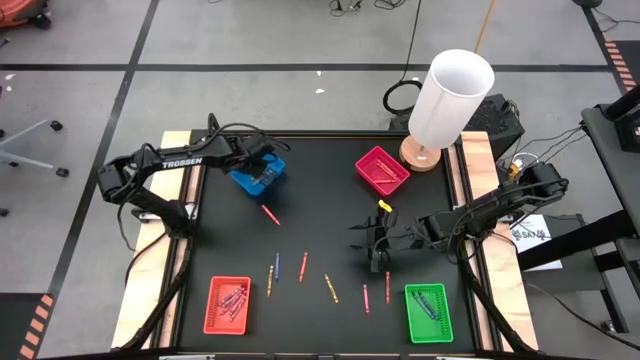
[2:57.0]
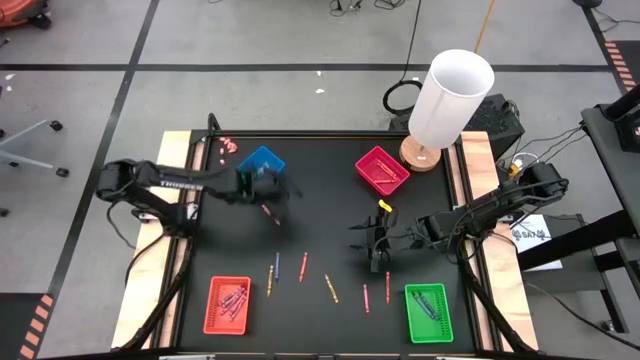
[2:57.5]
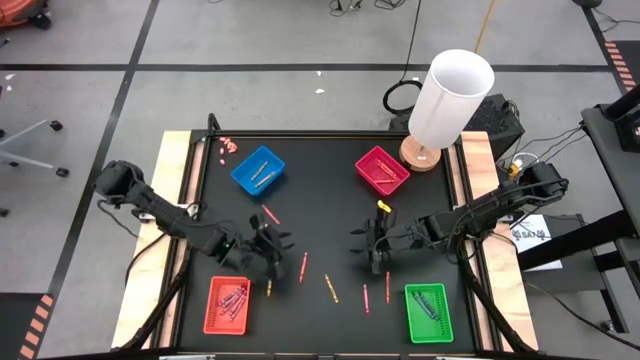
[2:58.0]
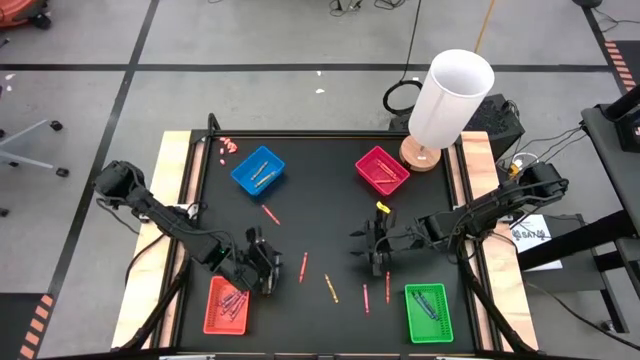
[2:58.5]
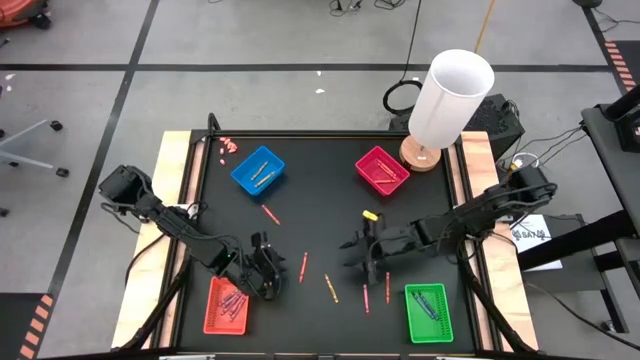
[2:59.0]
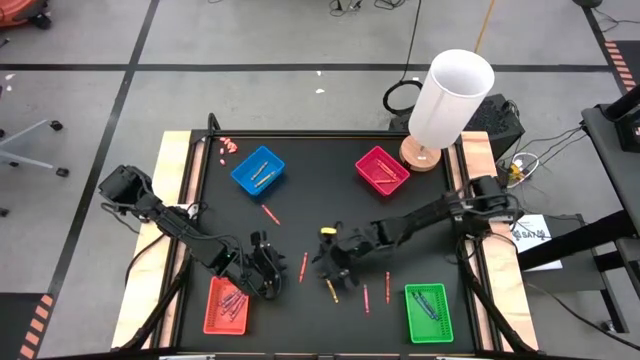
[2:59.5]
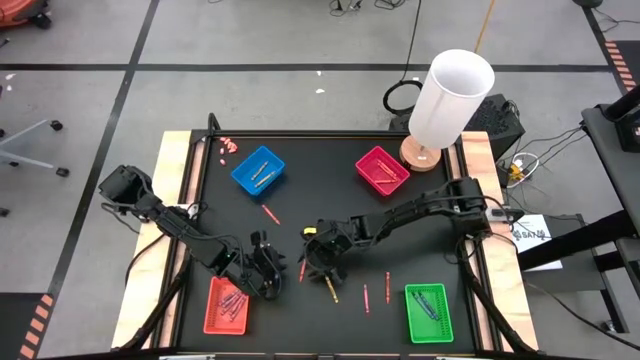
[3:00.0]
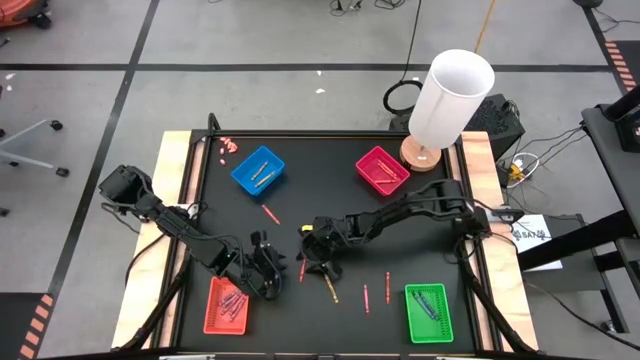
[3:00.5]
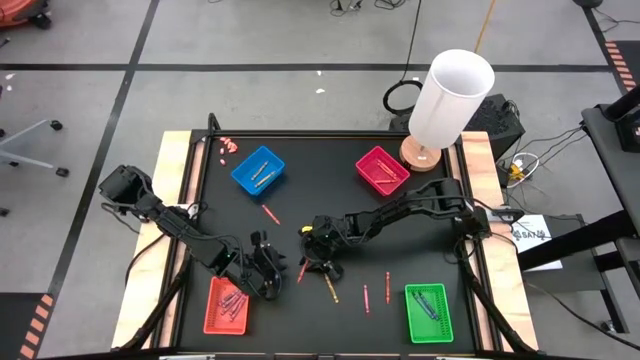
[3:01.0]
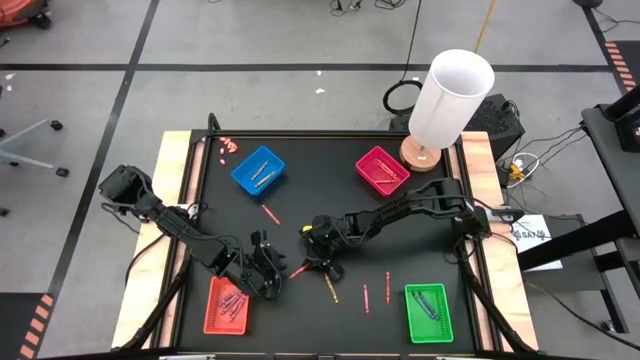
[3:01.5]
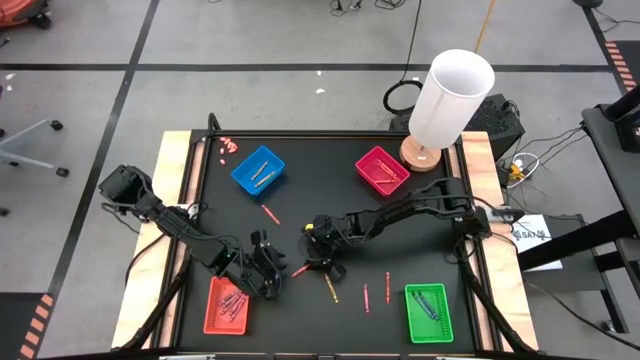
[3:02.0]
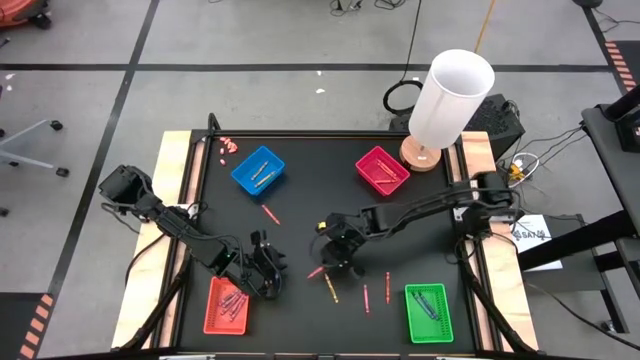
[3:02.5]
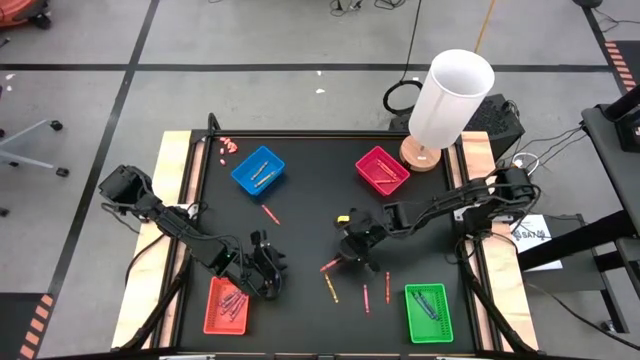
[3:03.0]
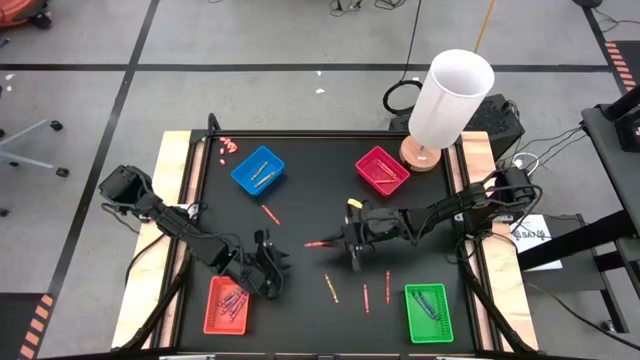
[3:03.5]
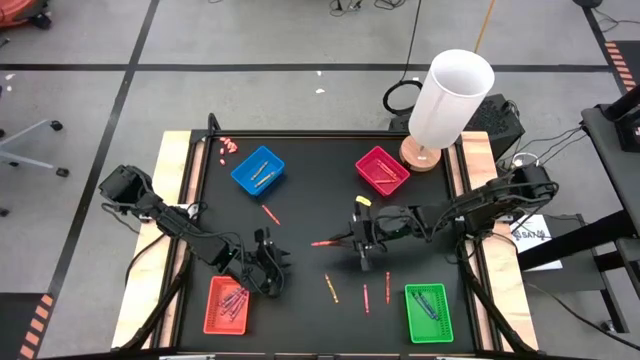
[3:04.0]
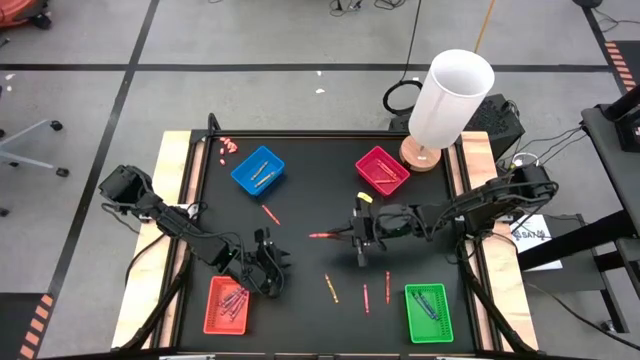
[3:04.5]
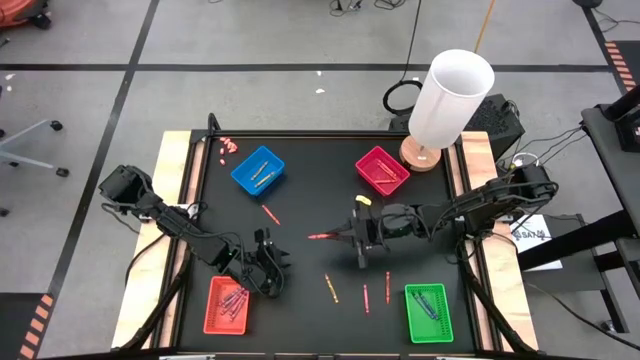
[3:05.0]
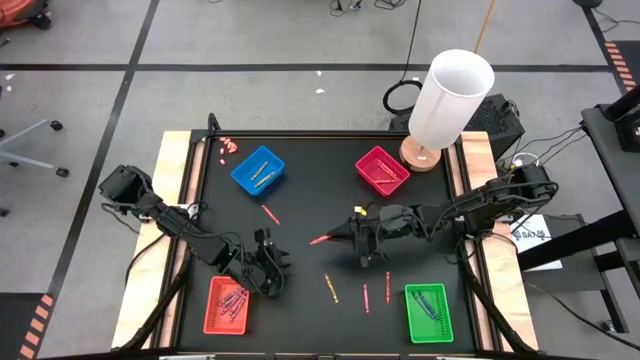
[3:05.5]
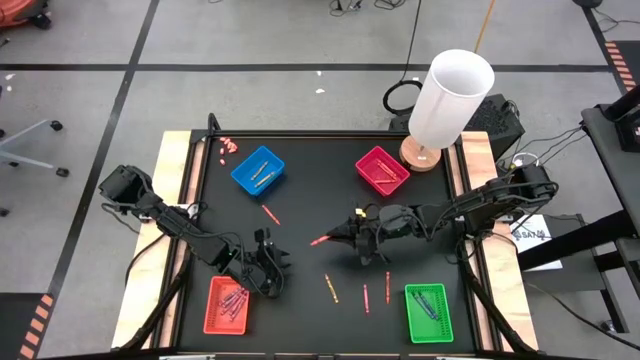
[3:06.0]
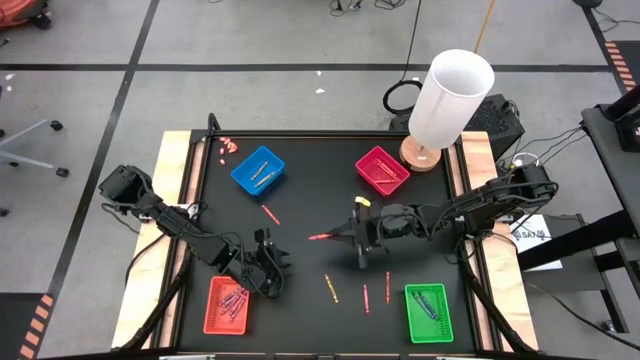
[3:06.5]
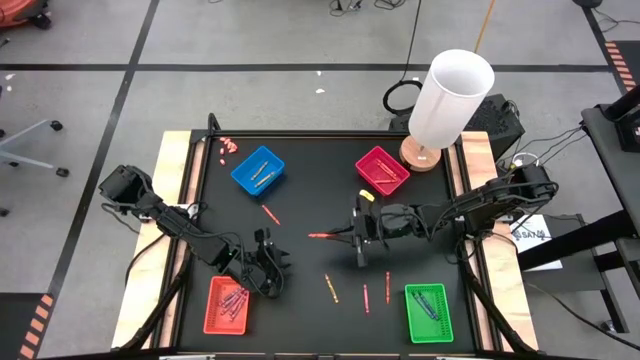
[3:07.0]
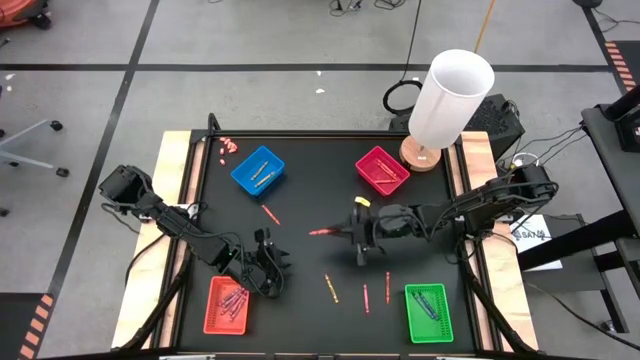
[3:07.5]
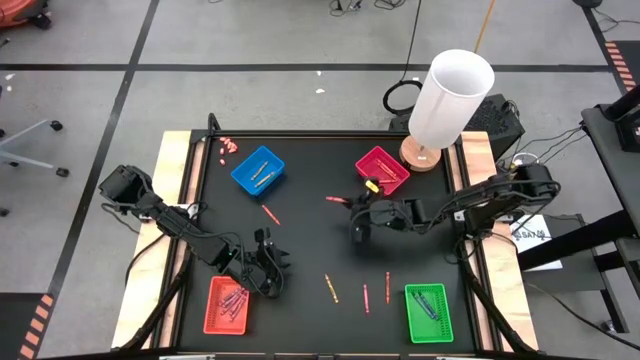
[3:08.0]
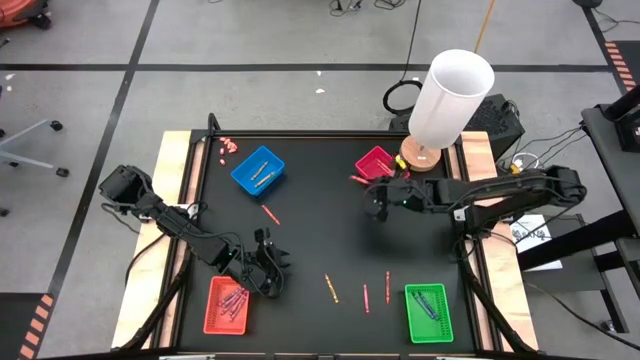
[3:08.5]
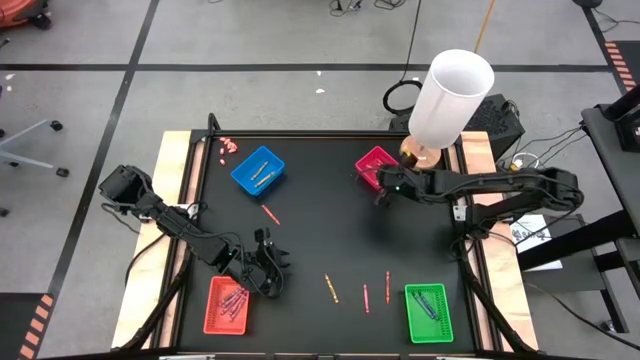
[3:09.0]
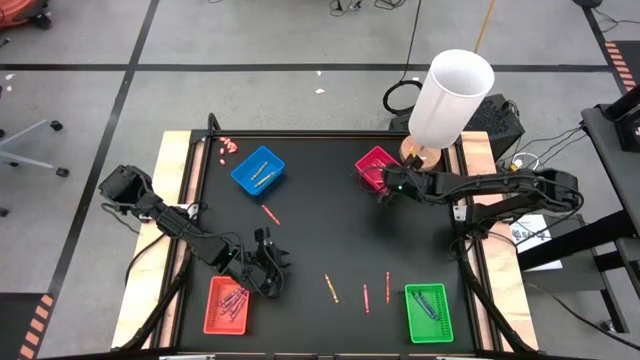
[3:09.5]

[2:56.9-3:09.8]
Task: Sort crayons
Put the orange crayon into the red bin

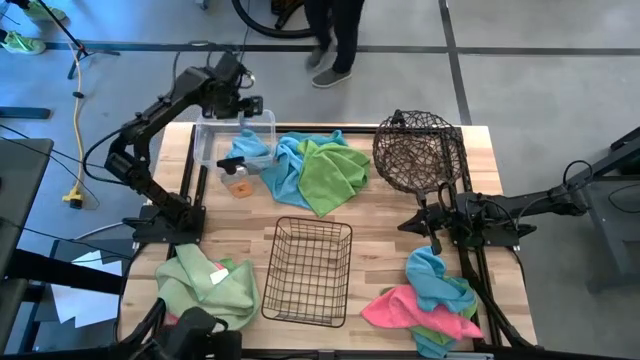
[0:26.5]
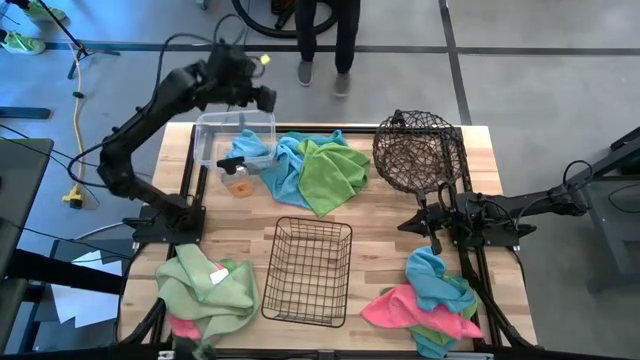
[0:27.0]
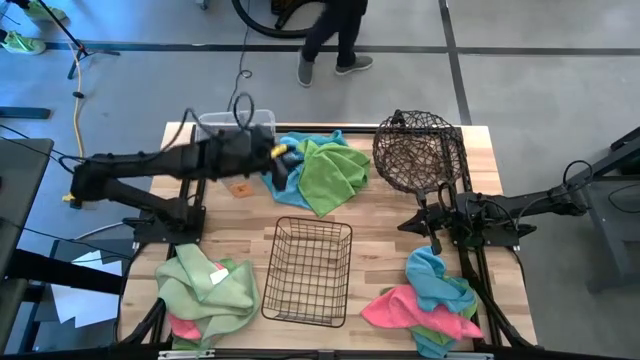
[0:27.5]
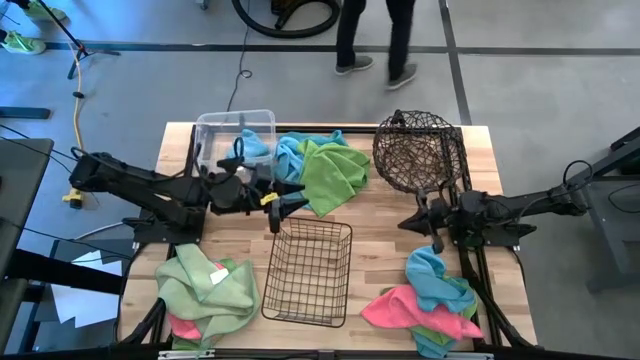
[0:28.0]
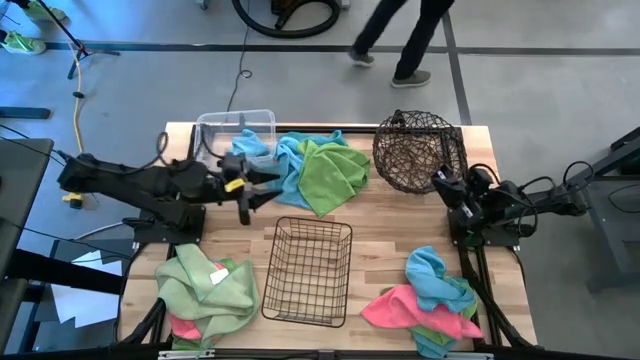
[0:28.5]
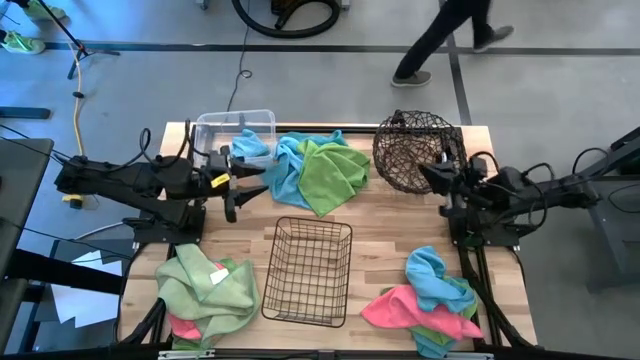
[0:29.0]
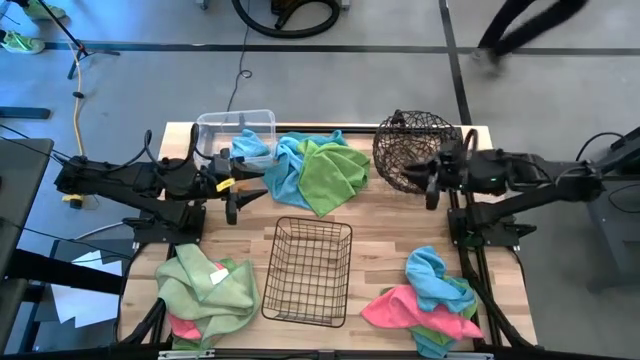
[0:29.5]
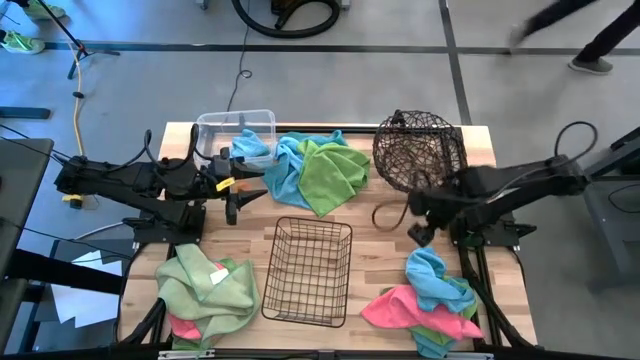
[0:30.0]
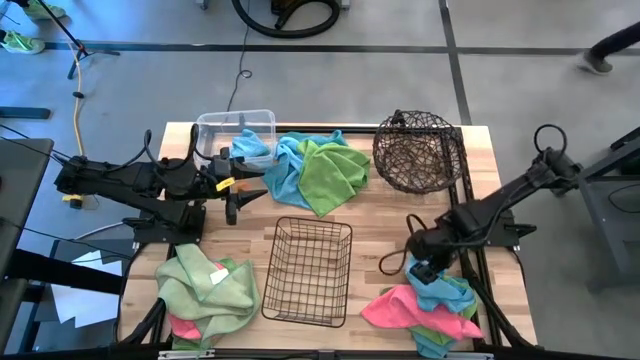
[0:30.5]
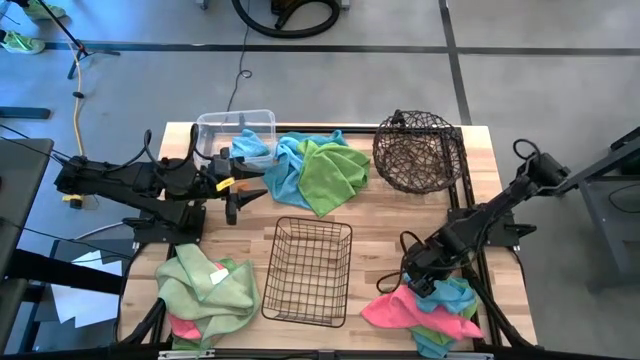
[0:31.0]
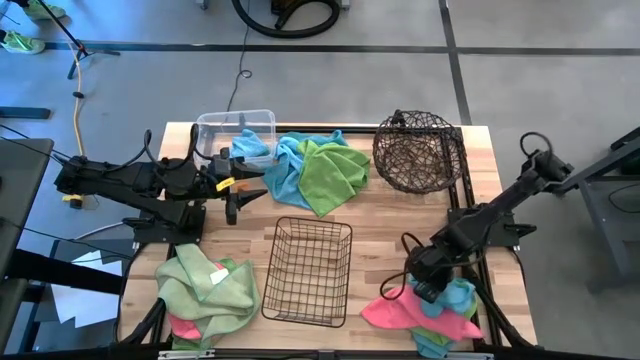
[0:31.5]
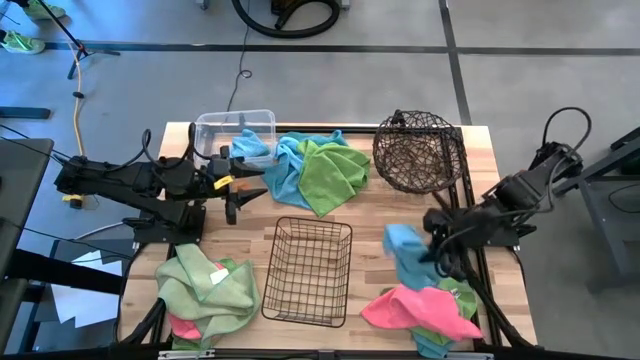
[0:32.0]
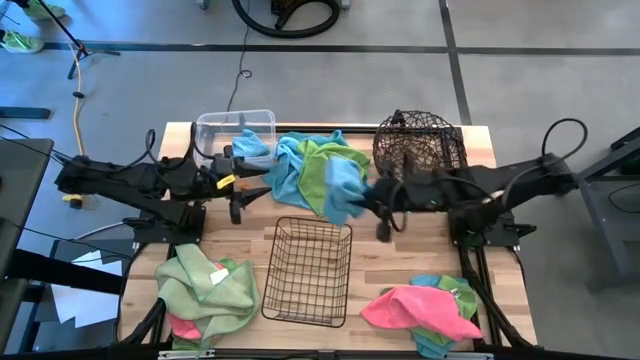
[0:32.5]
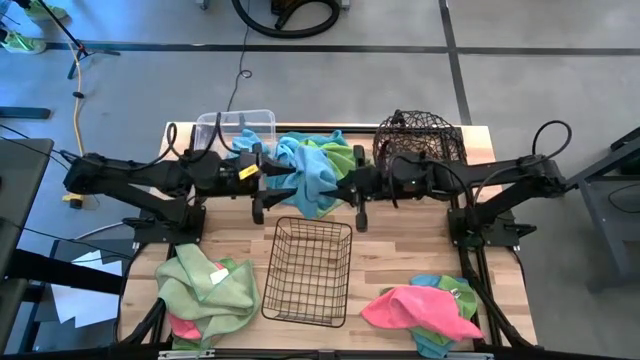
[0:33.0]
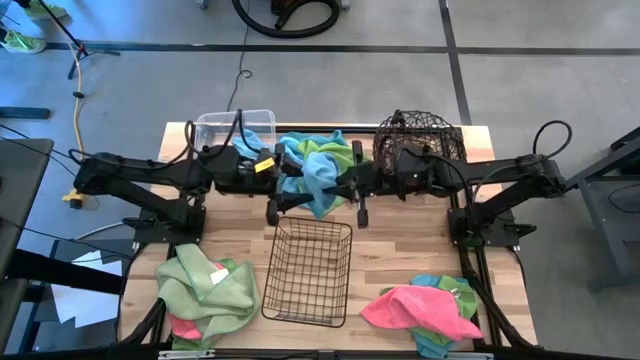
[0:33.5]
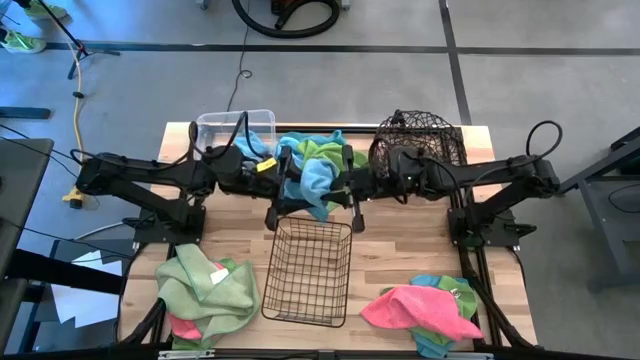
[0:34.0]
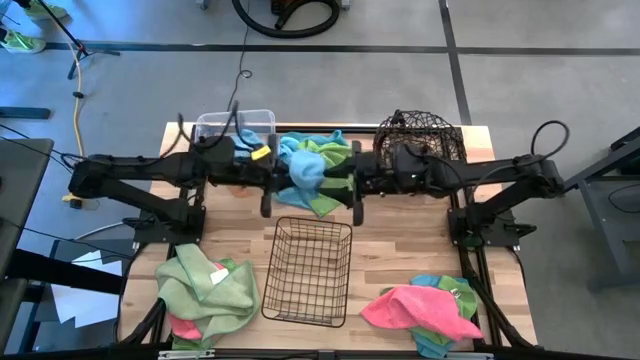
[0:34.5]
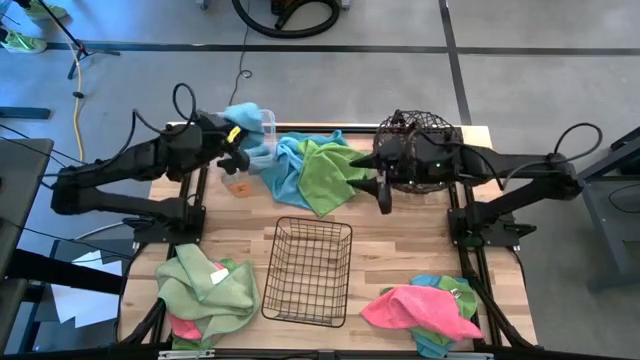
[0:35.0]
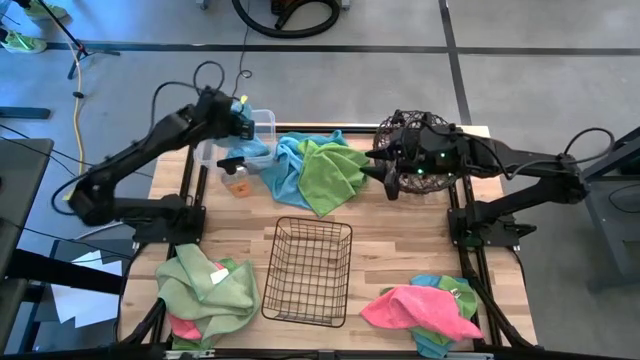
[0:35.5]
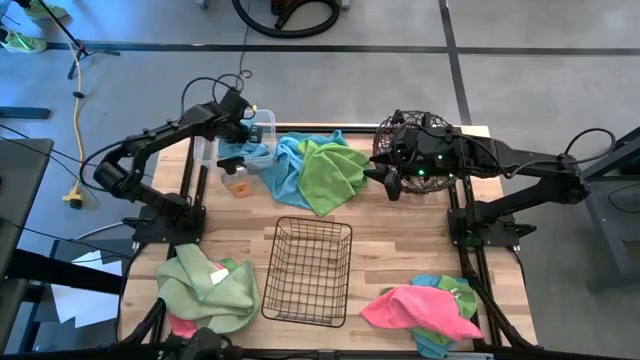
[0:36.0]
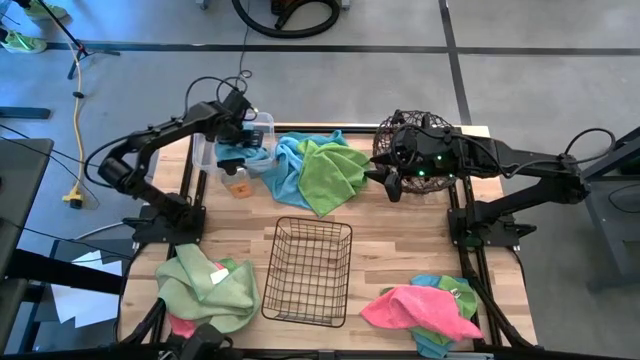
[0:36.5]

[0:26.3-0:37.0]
Task: Sort microfiber towel by color & place in baskets
Put the blue microfiber towel into the transparent bin
